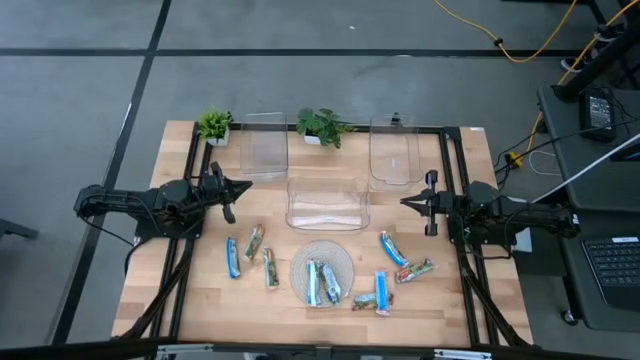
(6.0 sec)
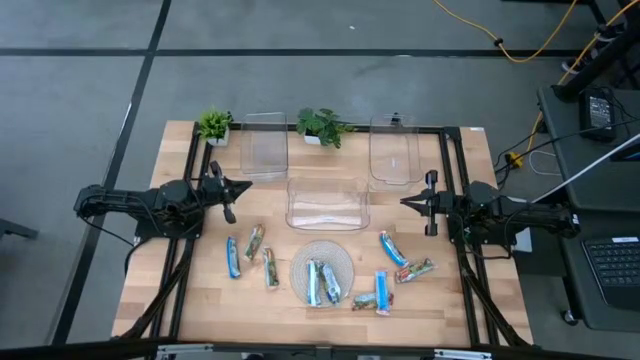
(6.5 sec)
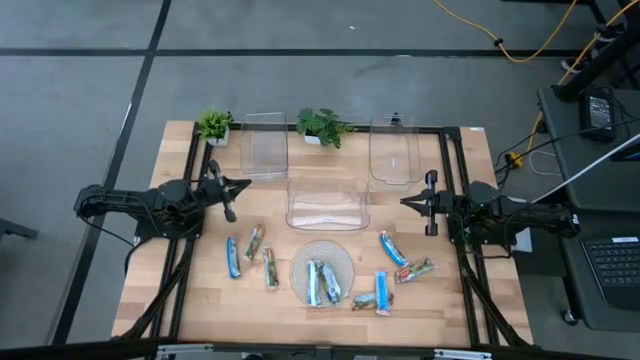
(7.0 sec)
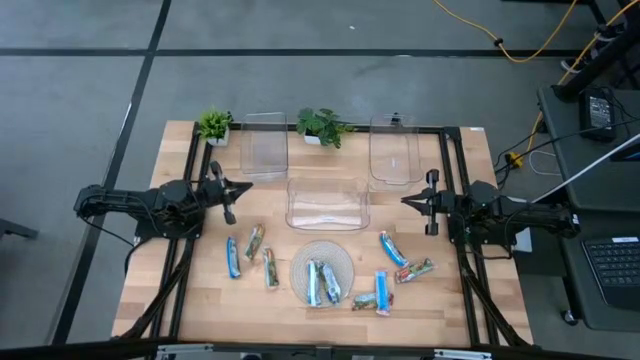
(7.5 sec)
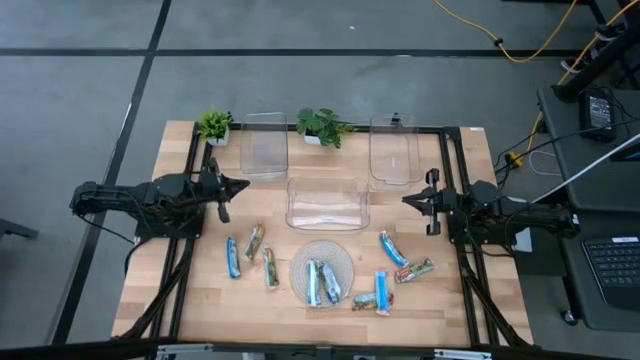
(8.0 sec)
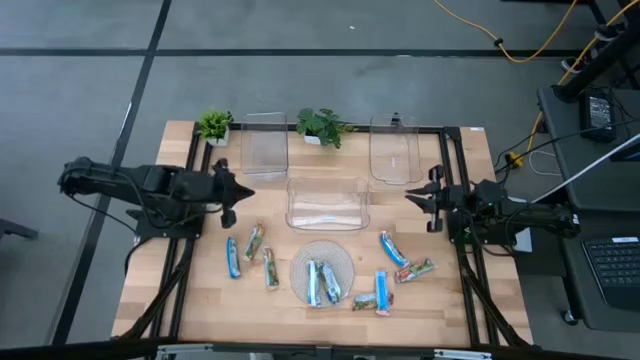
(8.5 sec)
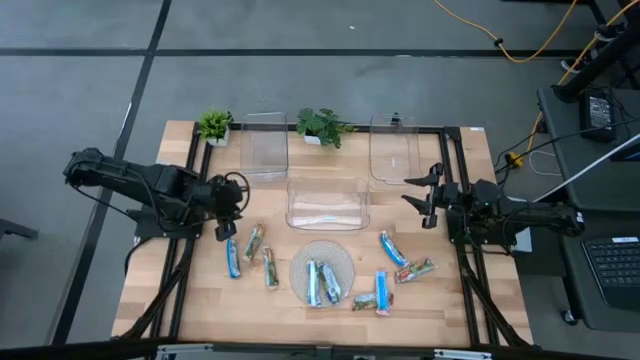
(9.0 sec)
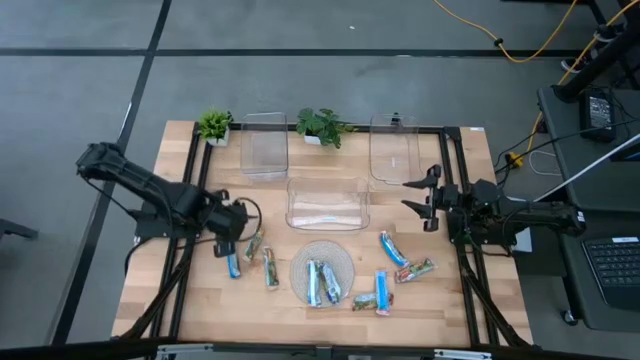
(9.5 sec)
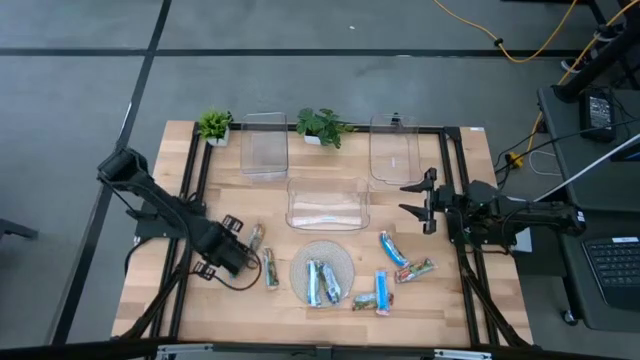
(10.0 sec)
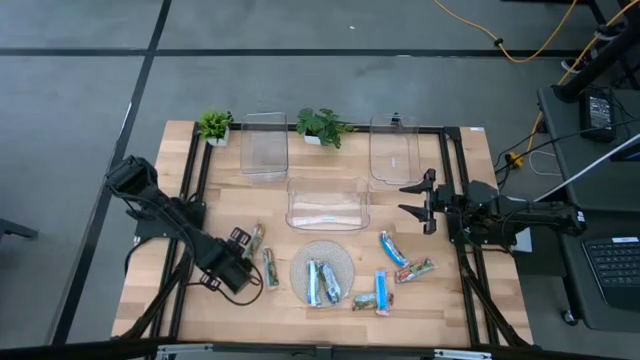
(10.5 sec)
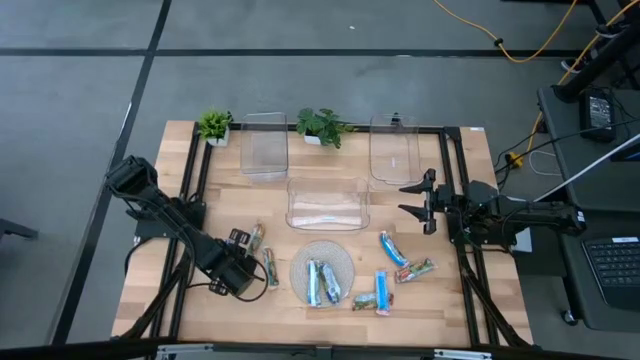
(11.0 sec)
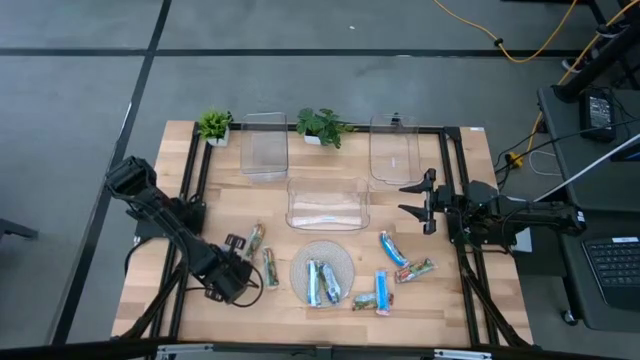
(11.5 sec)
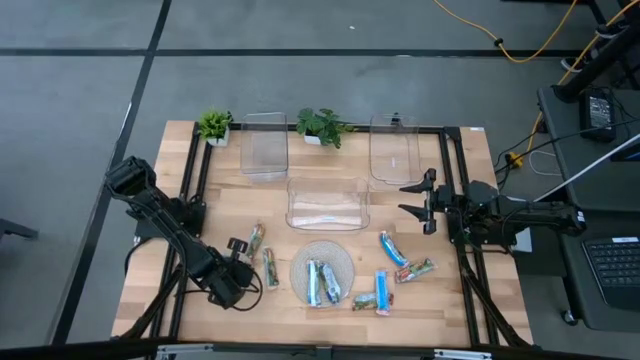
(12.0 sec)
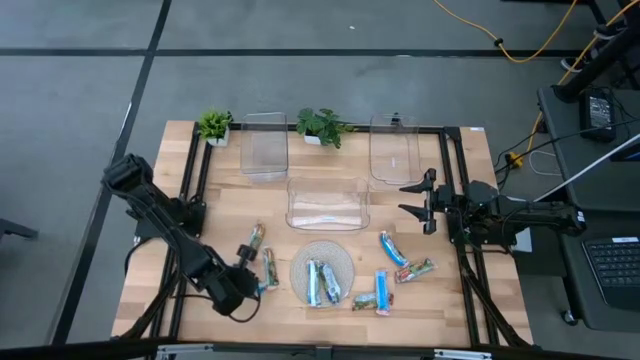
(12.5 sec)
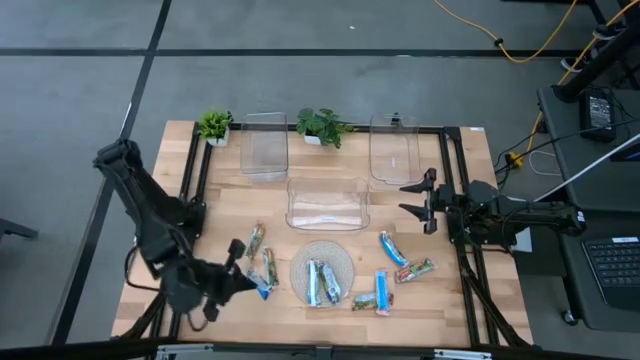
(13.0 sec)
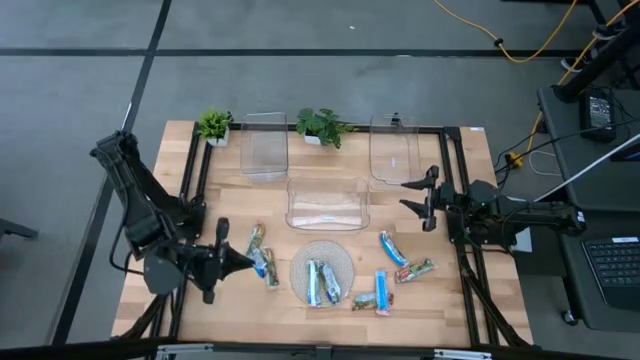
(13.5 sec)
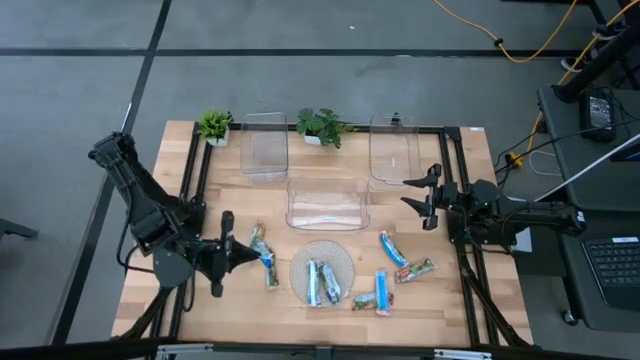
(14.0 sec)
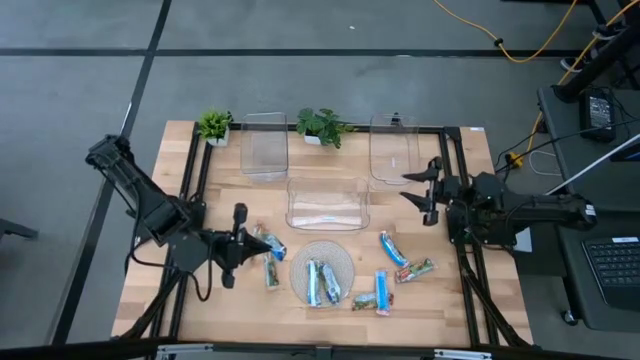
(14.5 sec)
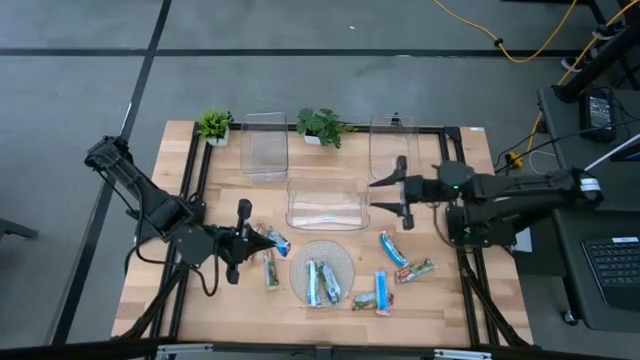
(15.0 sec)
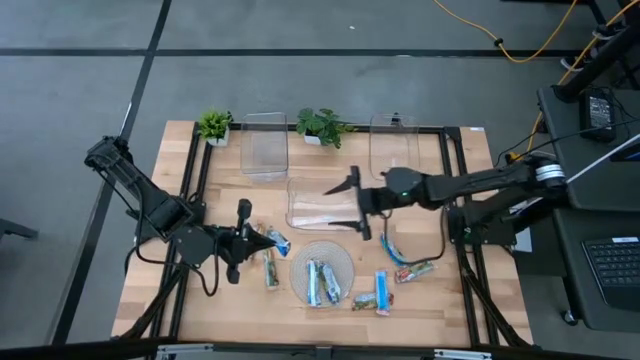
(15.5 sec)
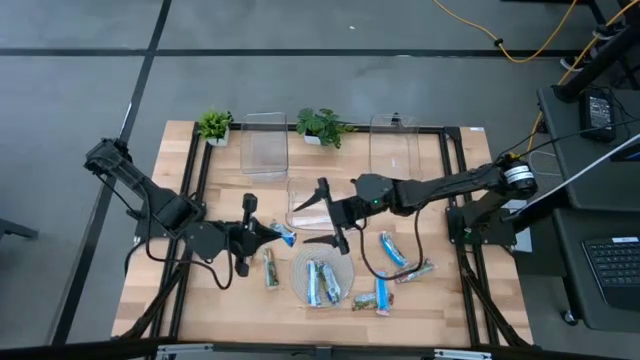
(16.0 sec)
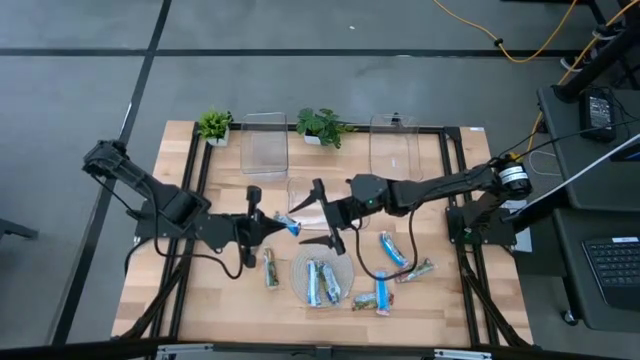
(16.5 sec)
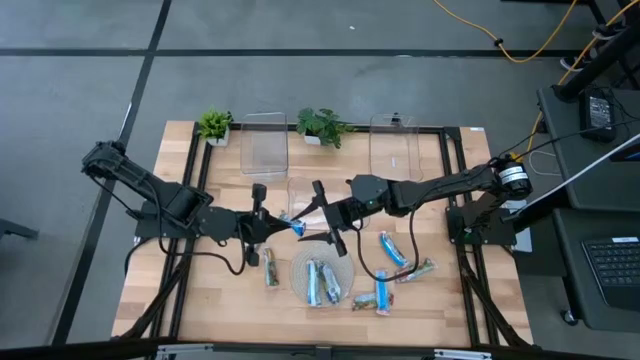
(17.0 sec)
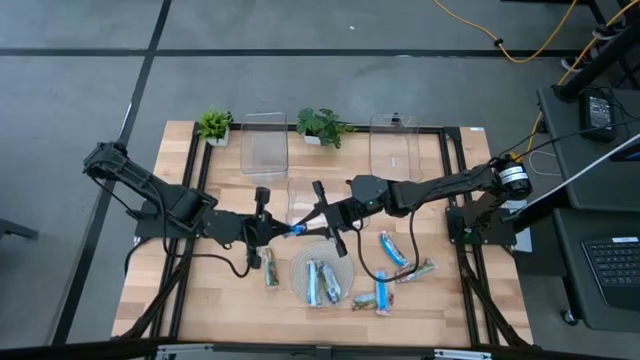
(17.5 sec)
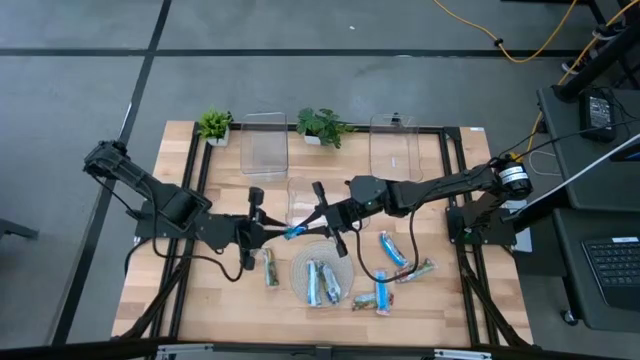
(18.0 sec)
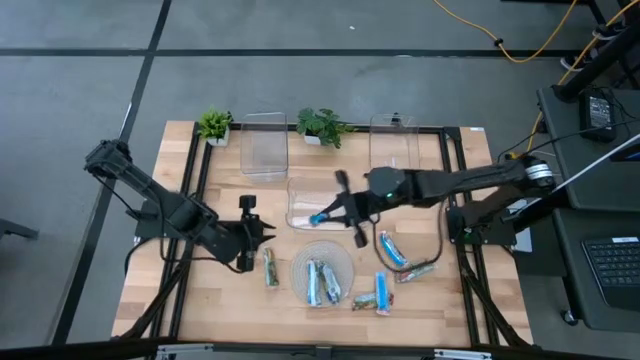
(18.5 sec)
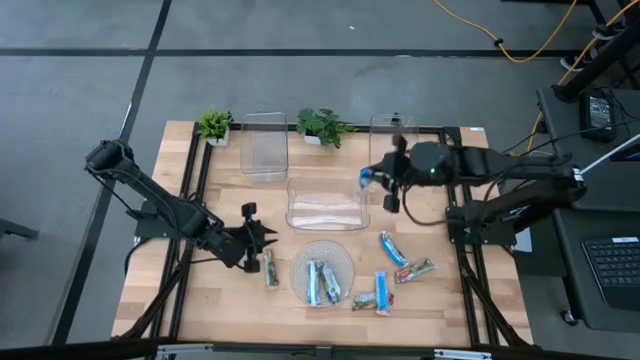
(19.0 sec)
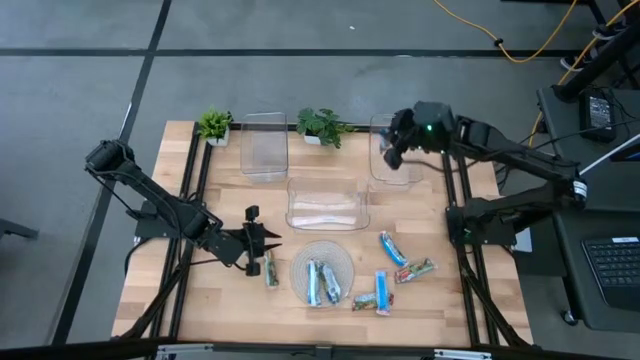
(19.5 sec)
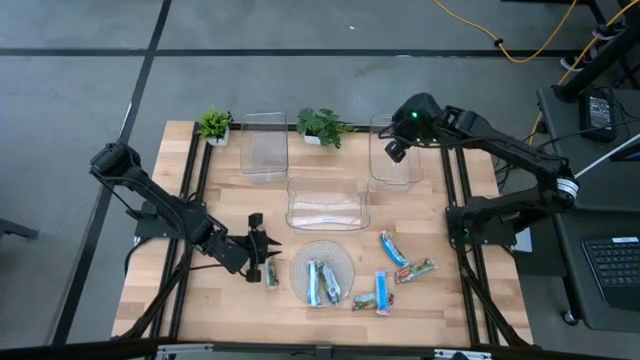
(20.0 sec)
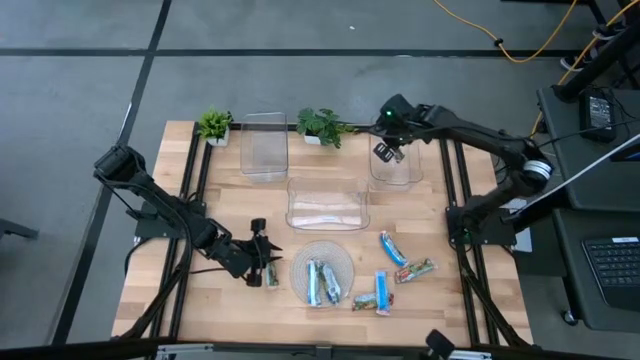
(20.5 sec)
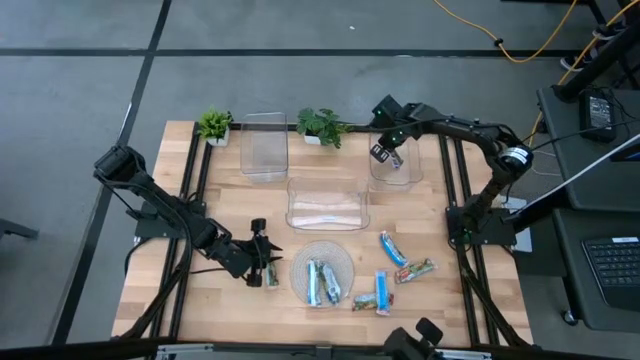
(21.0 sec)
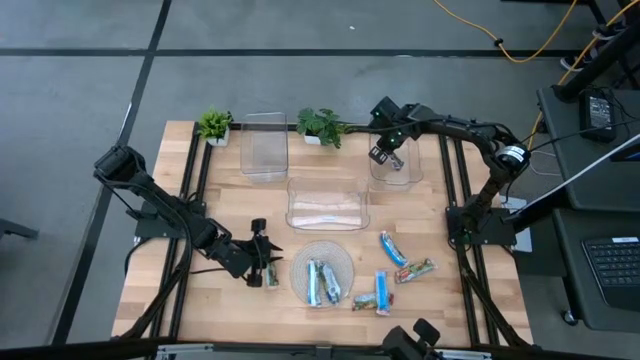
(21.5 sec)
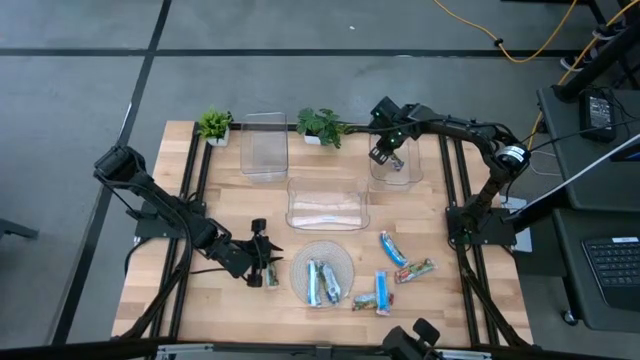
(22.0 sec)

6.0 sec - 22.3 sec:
Task: Pick and place Granola Bars by type
Put the blue granola bar into the top right transparent bin

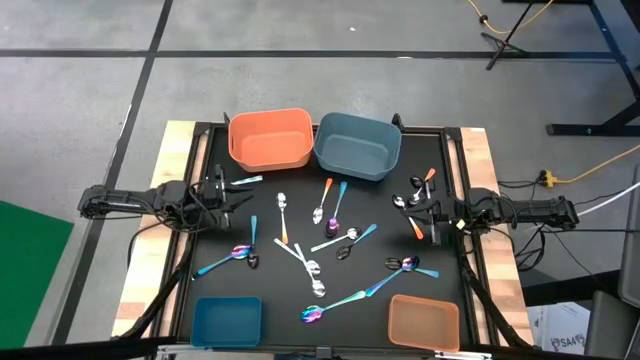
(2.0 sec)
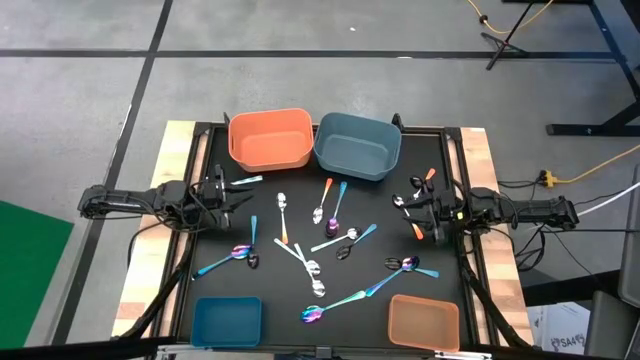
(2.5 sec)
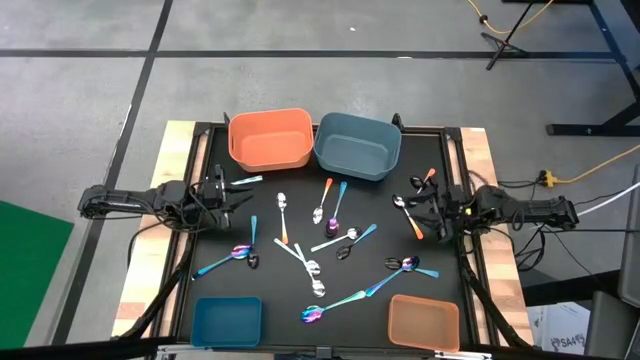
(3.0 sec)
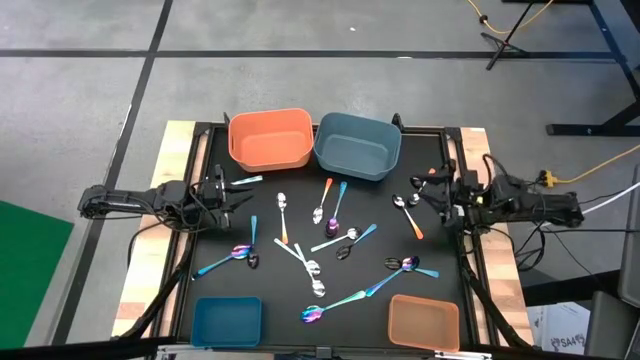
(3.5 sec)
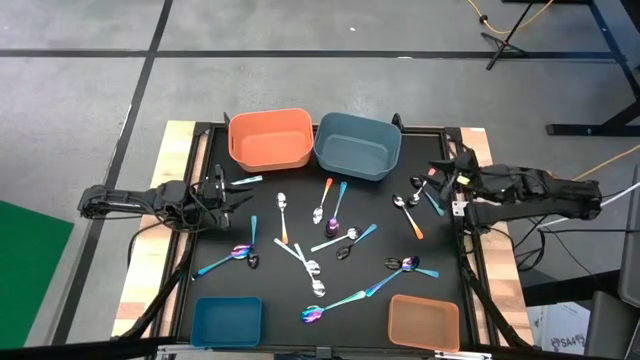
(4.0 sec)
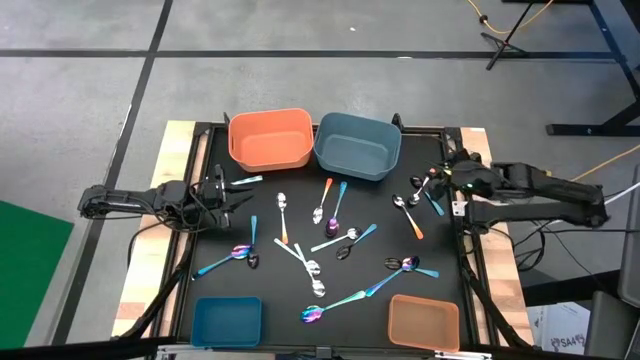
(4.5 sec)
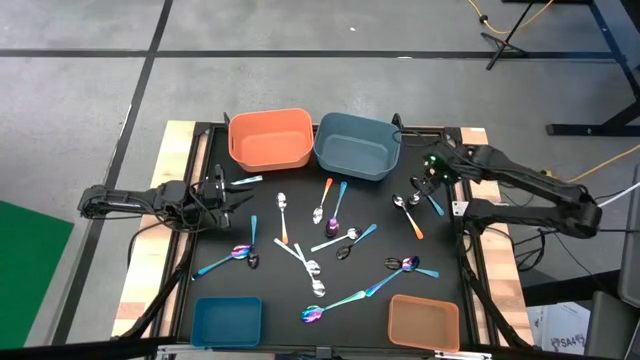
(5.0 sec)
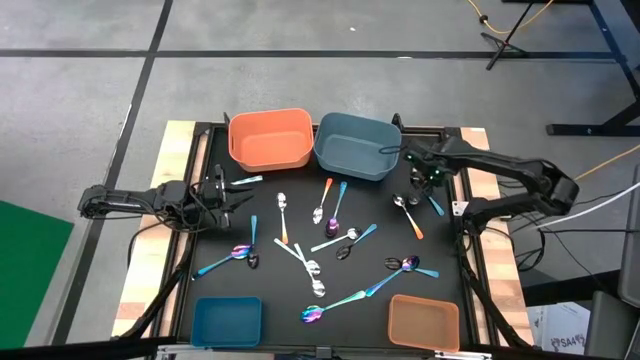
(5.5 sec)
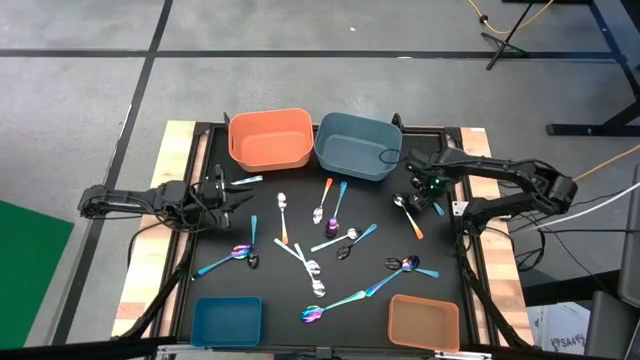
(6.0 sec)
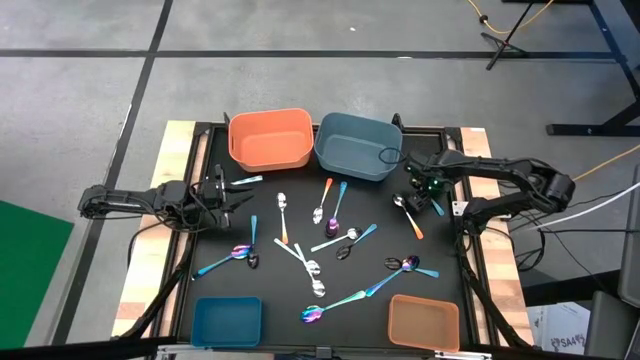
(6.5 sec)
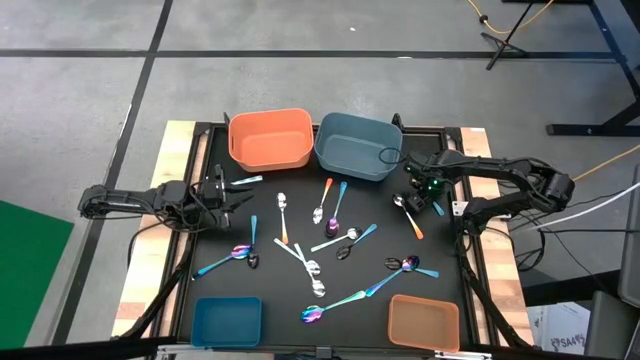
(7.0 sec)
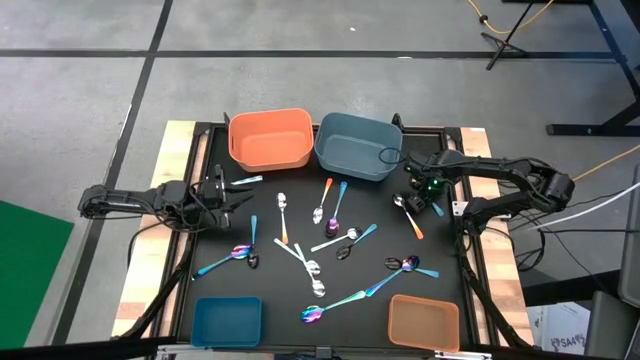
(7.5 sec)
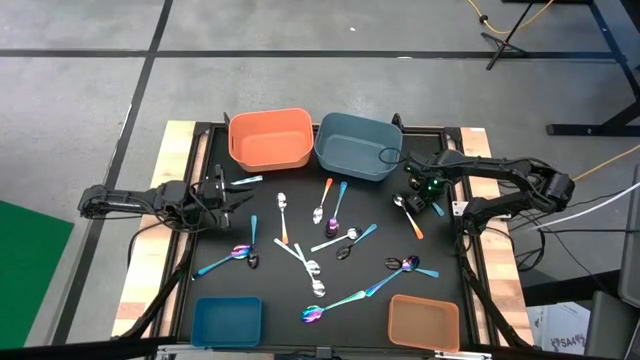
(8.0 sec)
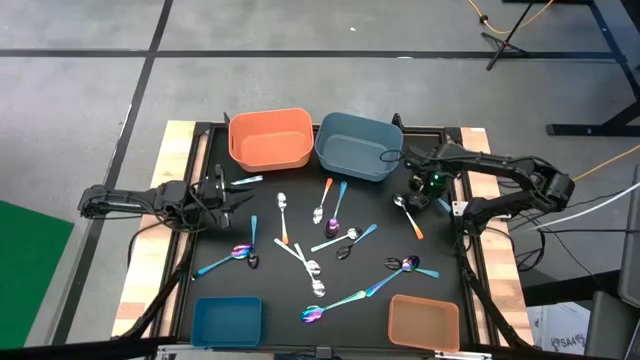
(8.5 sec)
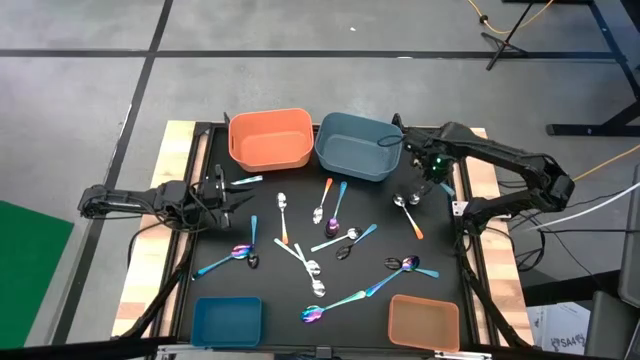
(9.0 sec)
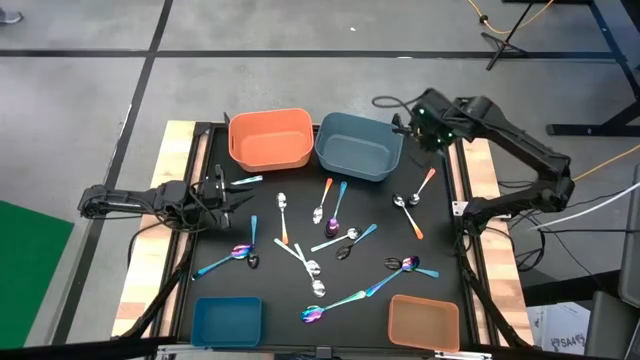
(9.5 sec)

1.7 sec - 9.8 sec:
Task: Sort silverware by color (type)
Put the blue spoon into the top blue bin
